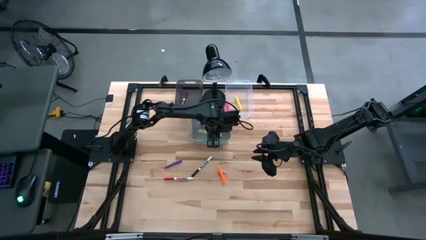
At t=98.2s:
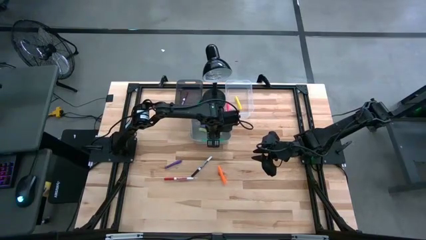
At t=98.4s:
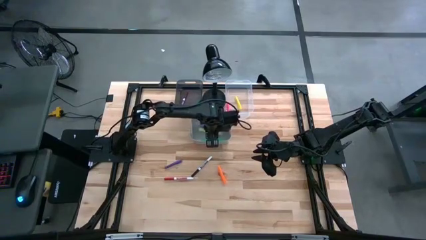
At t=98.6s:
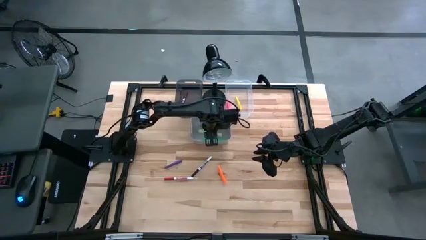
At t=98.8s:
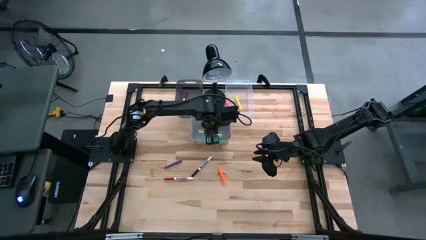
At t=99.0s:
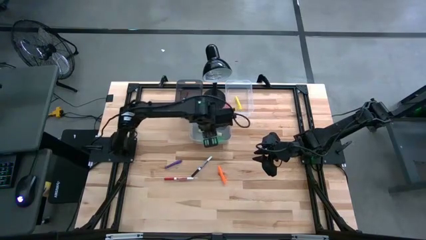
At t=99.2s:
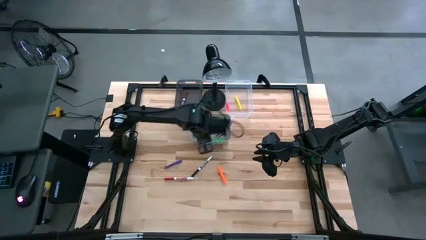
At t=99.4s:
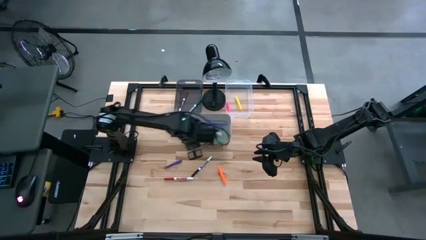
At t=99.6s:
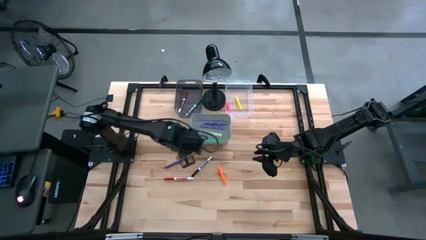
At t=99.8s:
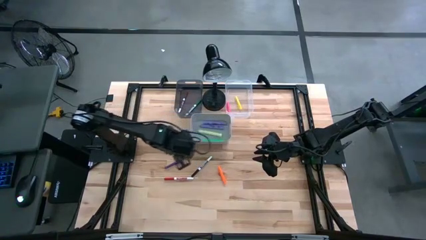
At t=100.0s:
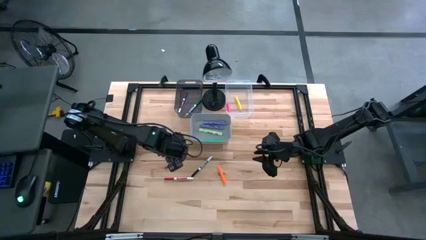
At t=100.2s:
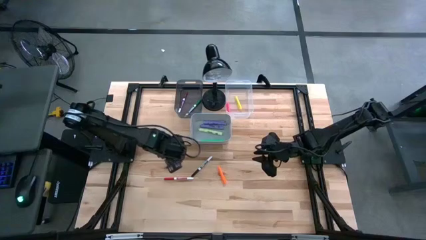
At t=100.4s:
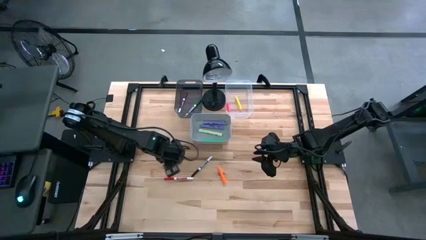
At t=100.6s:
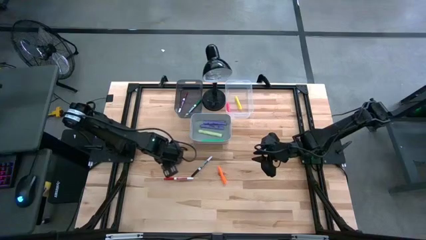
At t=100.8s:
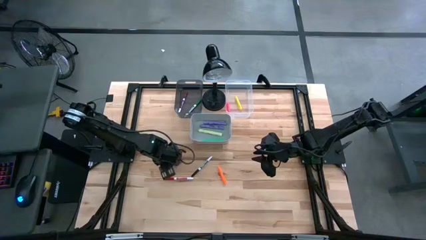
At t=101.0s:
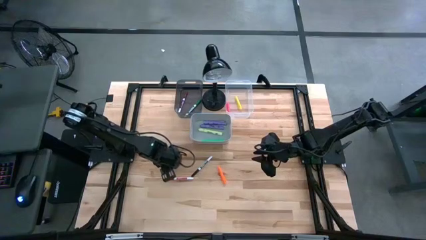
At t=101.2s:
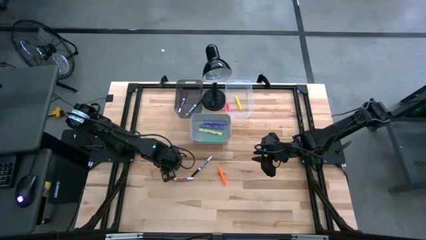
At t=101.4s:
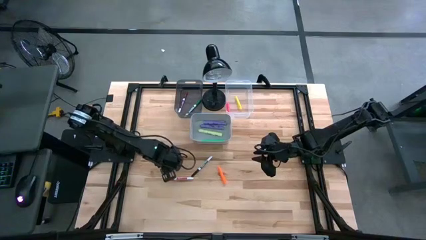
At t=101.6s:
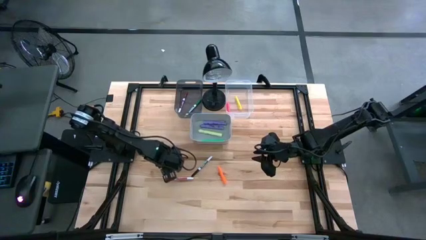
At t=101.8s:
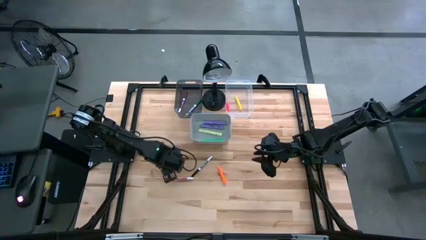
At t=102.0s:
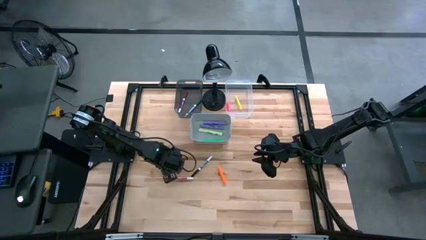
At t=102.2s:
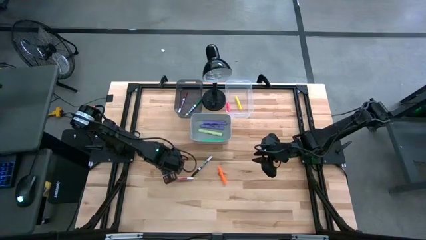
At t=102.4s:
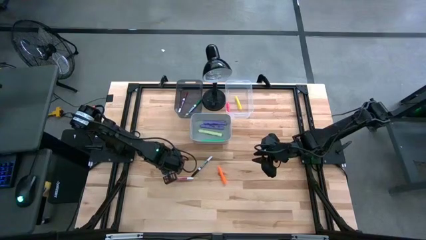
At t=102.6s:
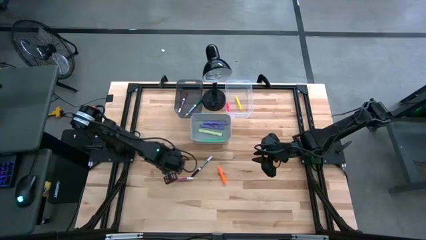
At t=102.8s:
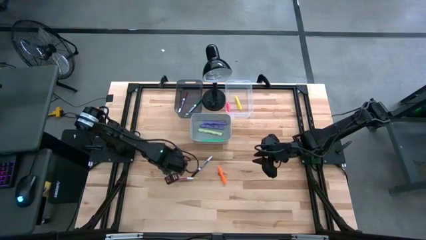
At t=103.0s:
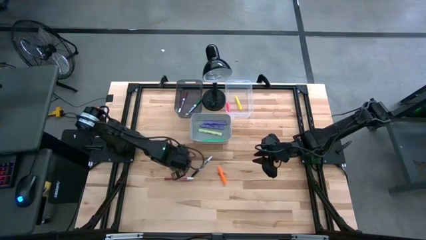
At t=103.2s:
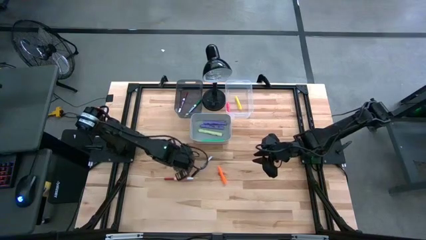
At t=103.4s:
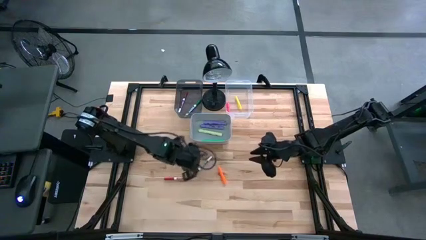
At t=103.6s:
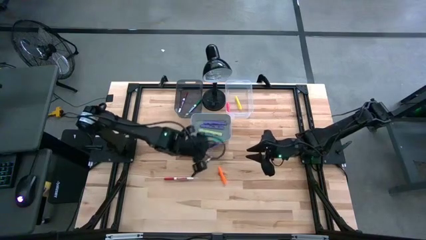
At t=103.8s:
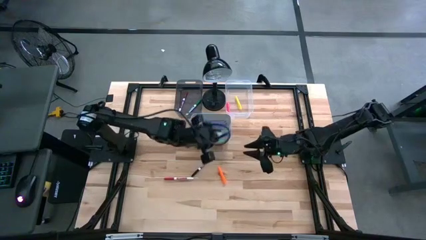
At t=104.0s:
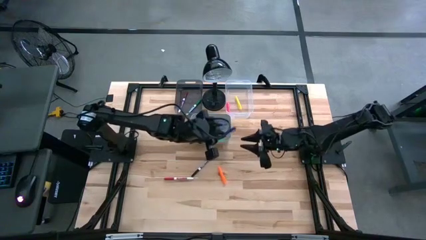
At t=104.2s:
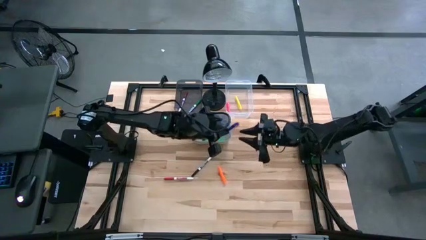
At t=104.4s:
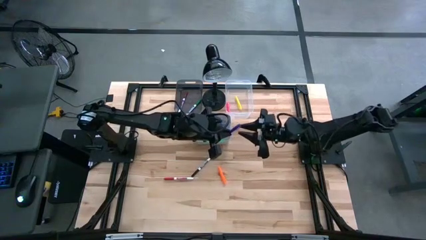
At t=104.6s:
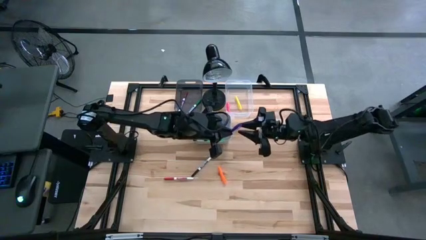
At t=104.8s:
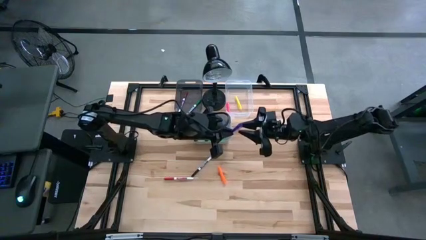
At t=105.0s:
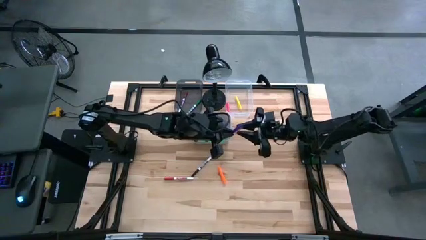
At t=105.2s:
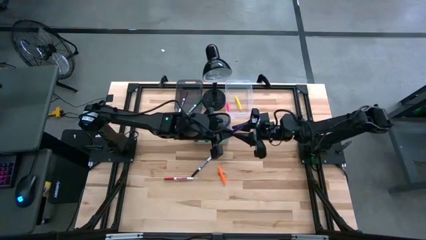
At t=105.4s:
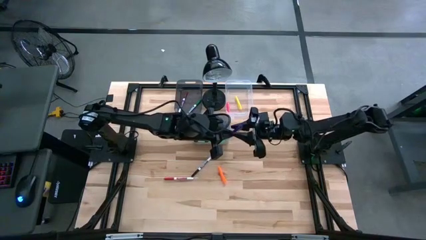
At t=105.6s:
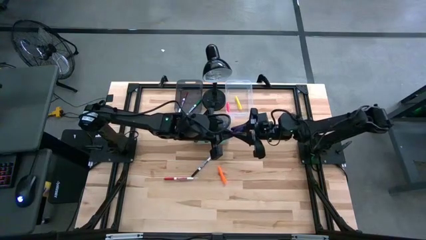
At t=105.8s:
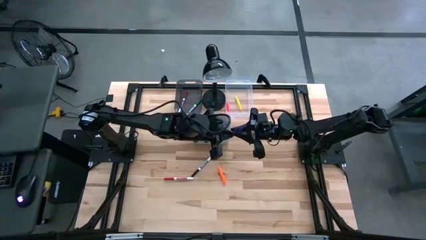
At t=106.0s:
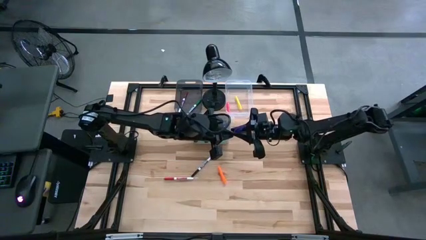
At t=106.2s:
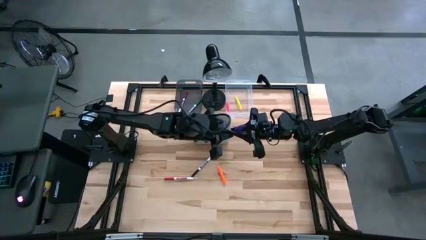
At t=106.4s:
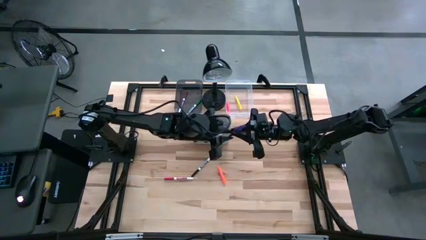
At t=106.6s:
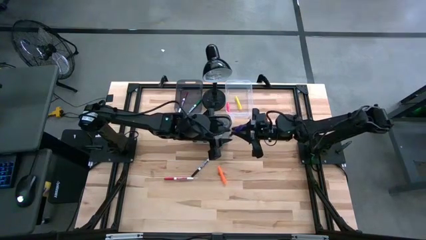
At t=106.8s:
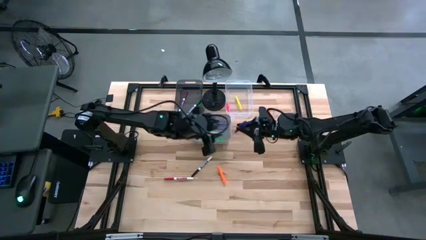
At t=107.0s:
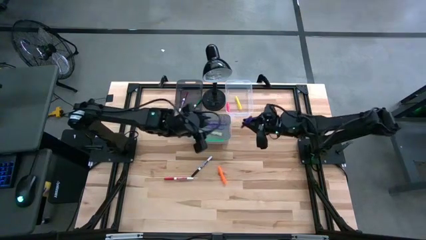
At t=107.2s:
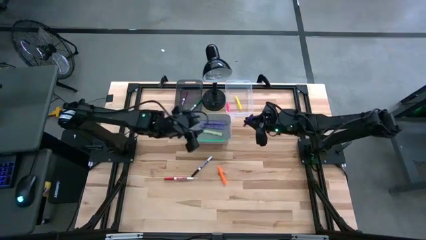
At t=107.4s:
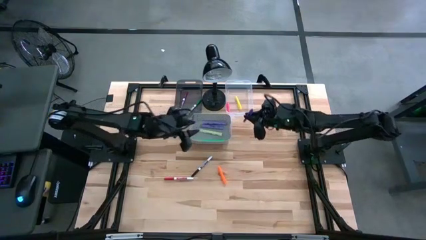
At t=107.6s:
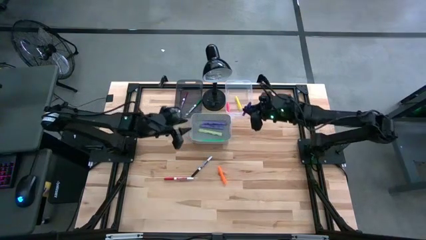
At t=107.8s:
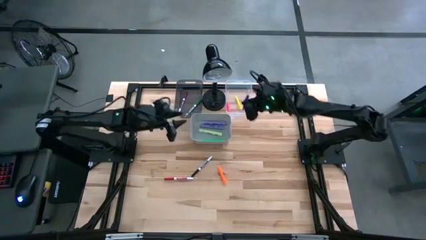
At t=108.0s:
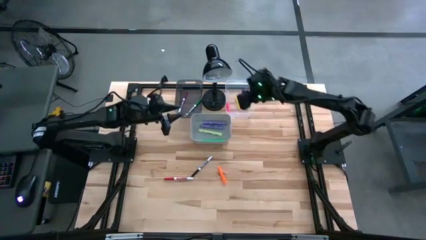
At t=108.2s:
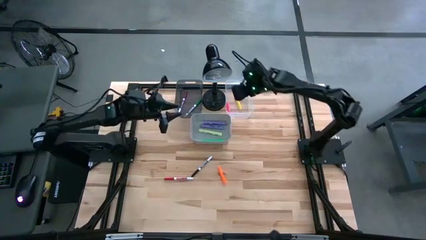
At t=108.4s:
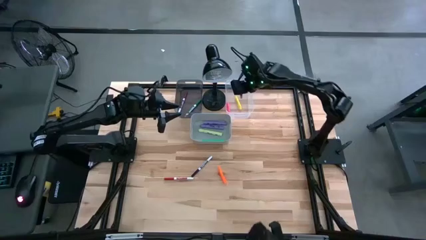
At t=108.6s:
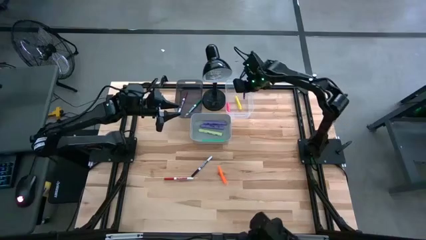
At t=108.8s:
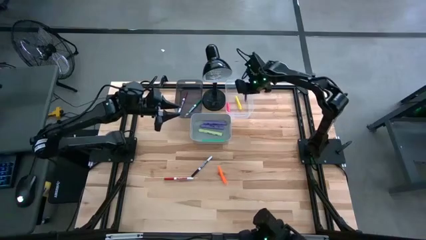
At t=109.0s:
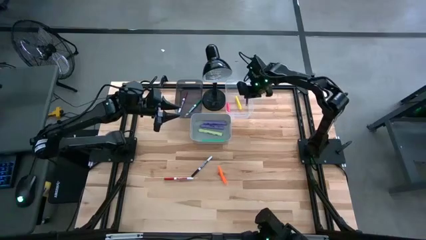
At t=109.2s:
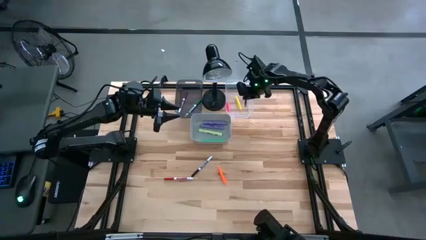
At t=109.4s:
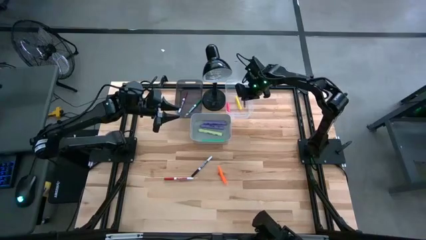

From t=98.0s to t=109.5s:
Task: Pick & Place Markers
Put the small purple marker into the transparent bin
